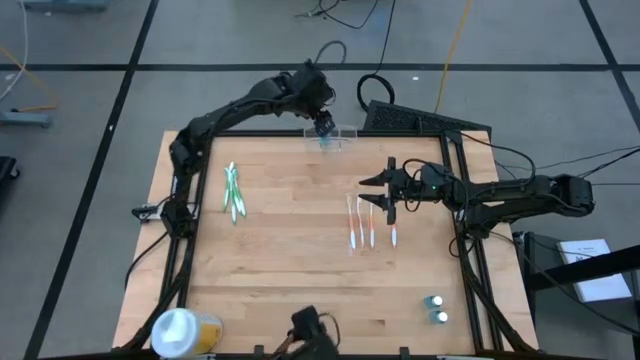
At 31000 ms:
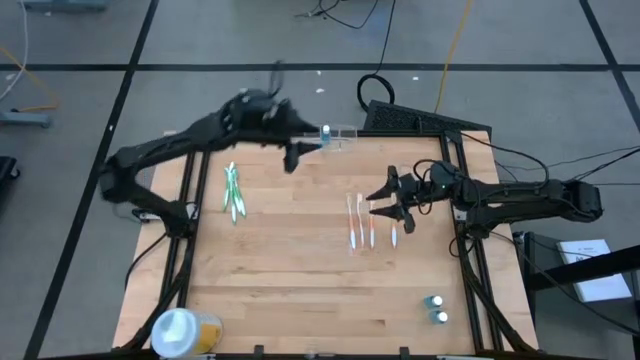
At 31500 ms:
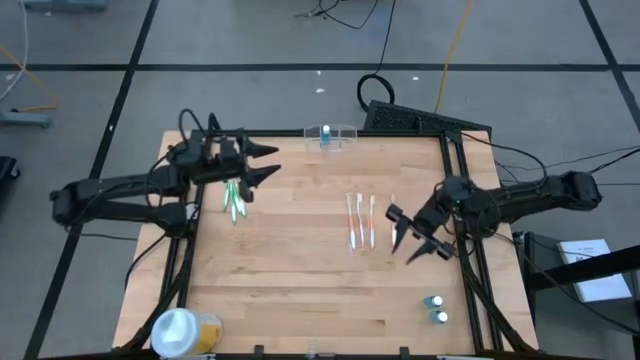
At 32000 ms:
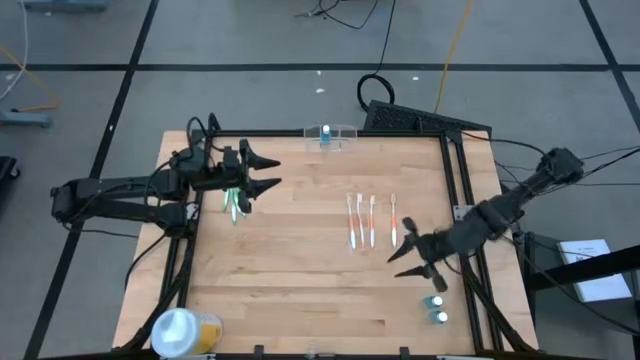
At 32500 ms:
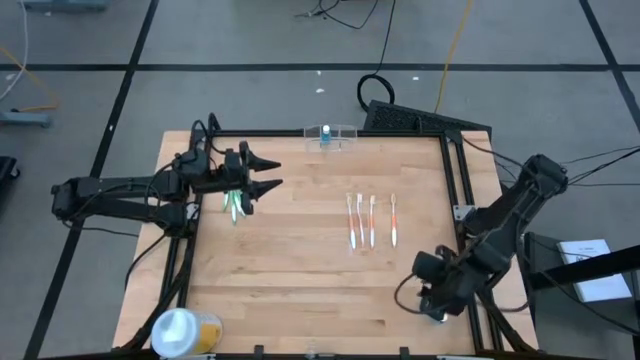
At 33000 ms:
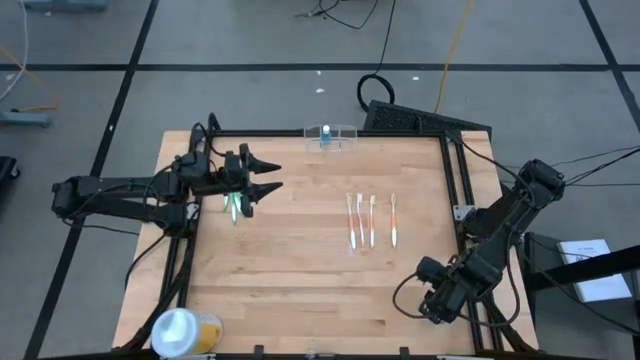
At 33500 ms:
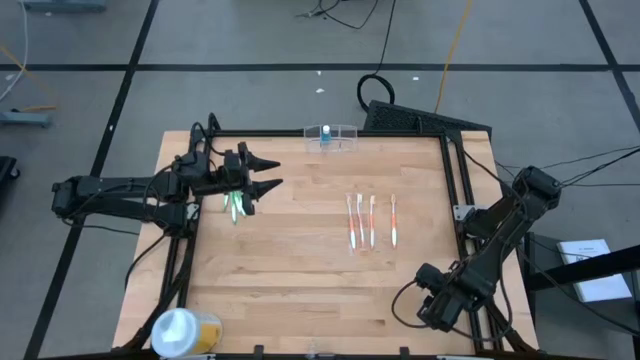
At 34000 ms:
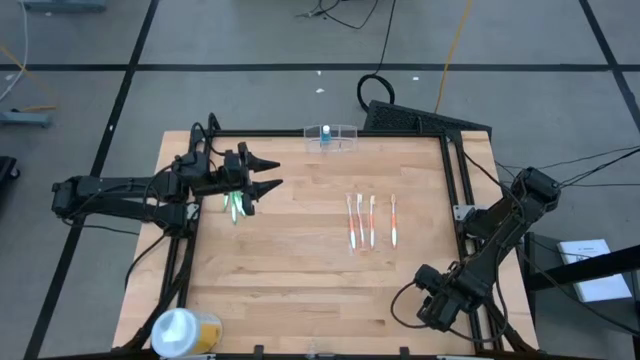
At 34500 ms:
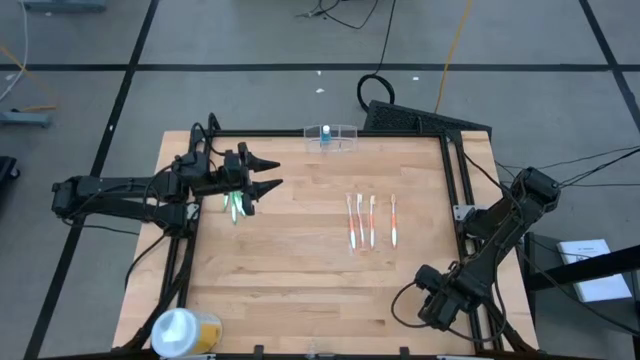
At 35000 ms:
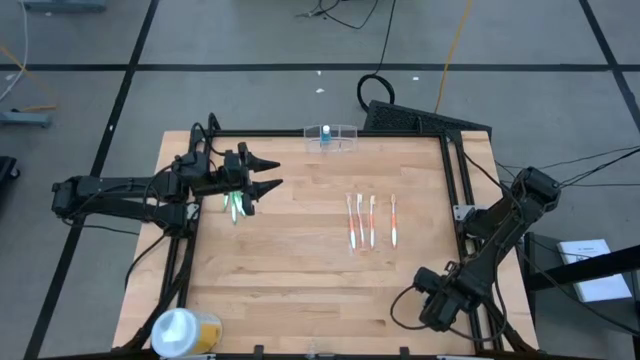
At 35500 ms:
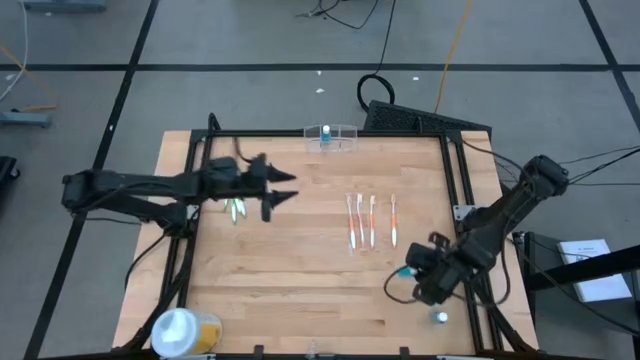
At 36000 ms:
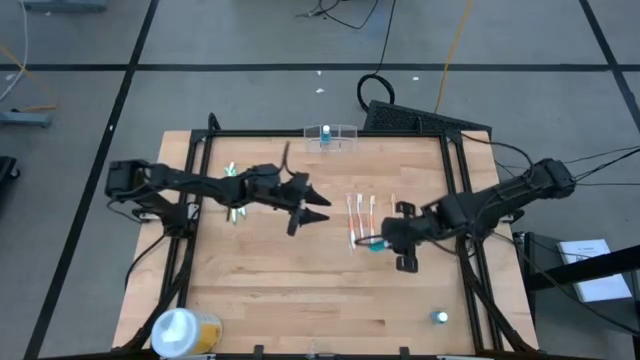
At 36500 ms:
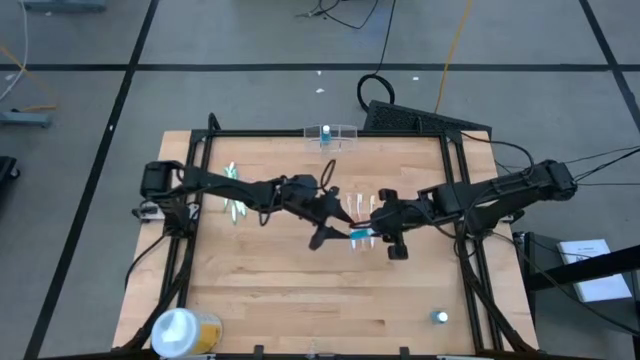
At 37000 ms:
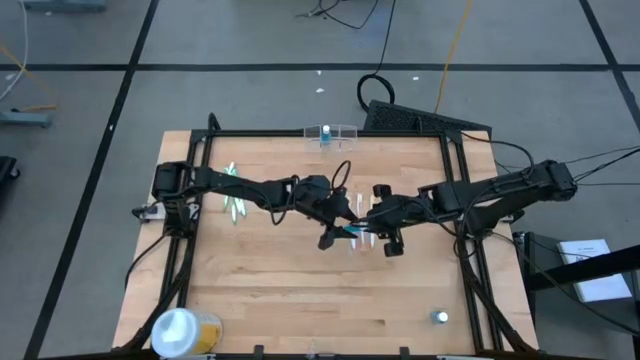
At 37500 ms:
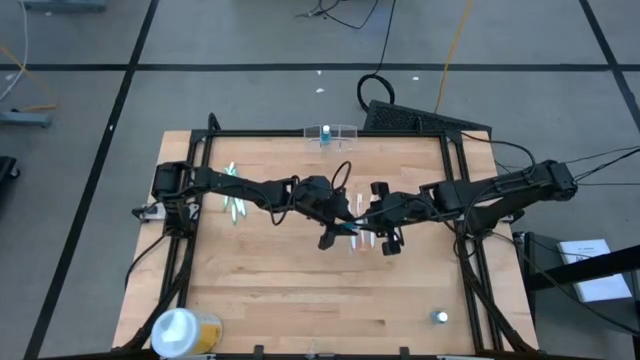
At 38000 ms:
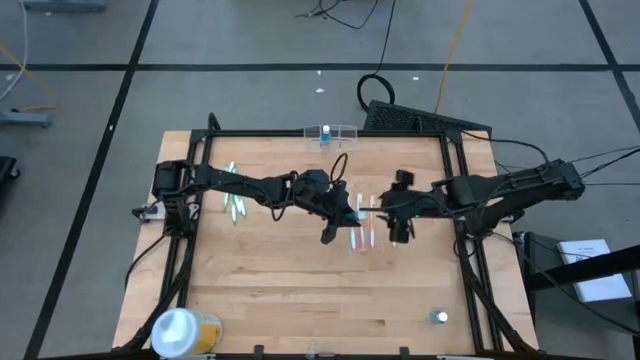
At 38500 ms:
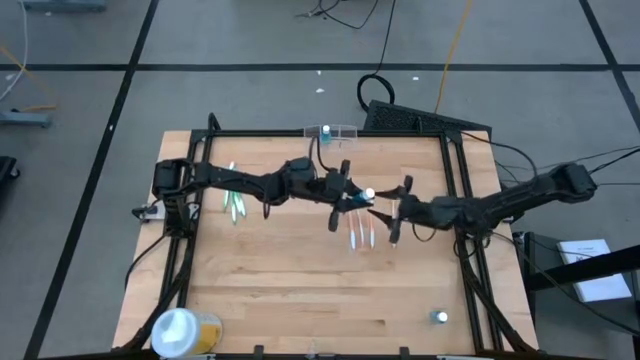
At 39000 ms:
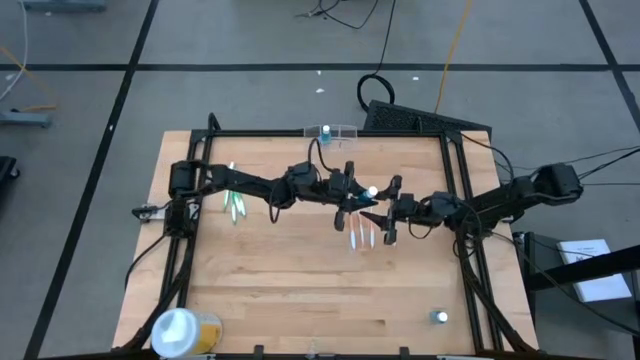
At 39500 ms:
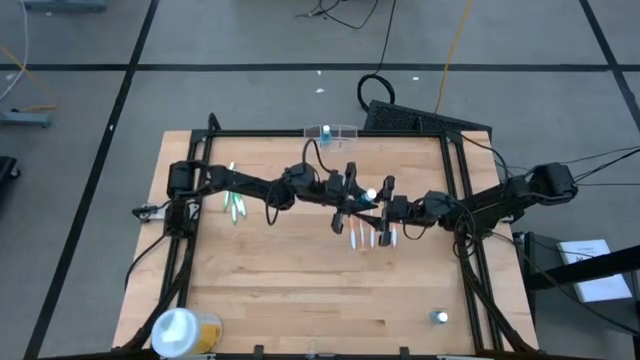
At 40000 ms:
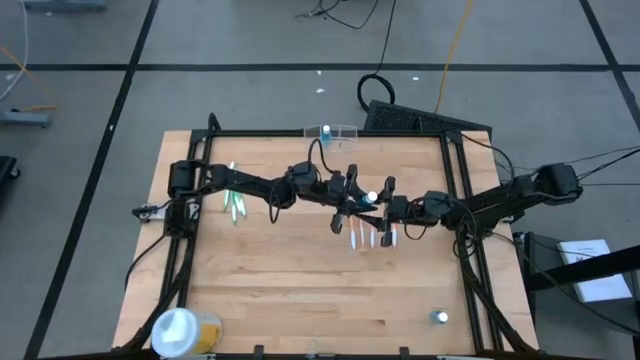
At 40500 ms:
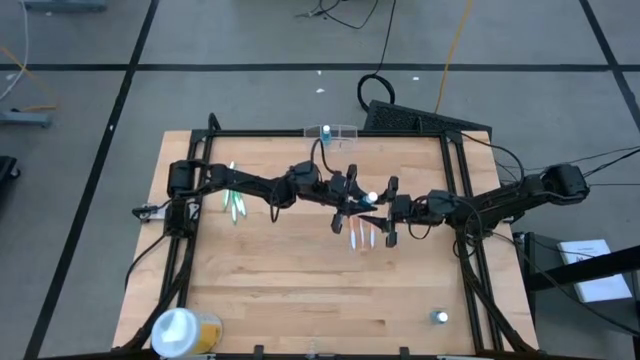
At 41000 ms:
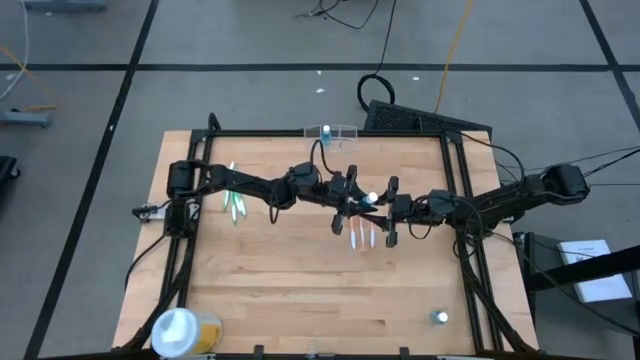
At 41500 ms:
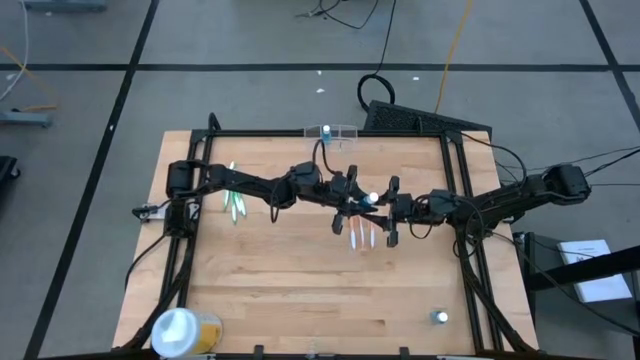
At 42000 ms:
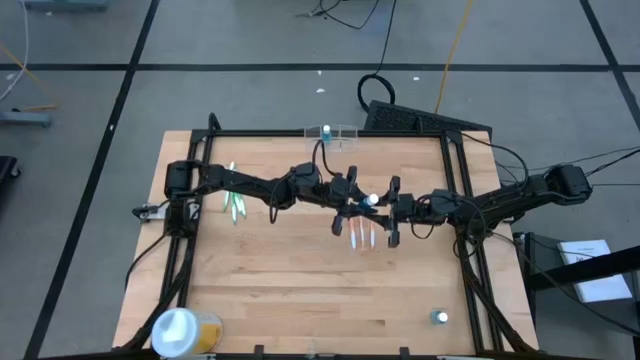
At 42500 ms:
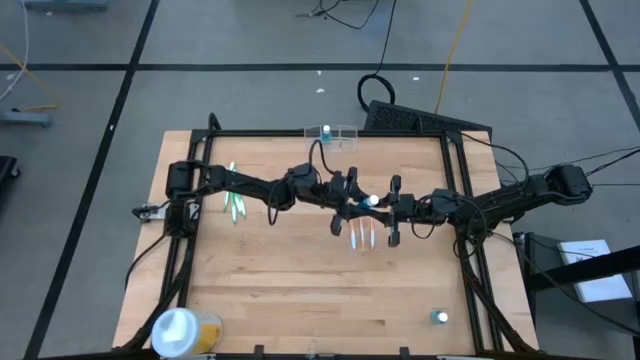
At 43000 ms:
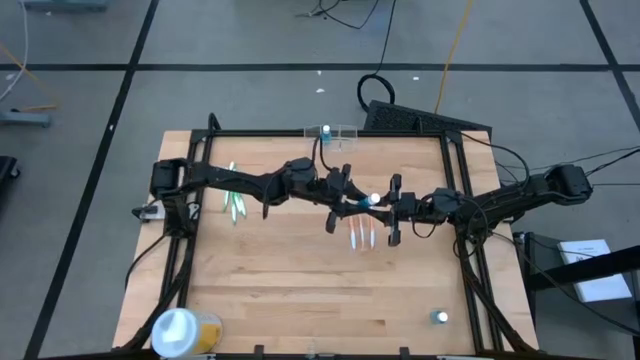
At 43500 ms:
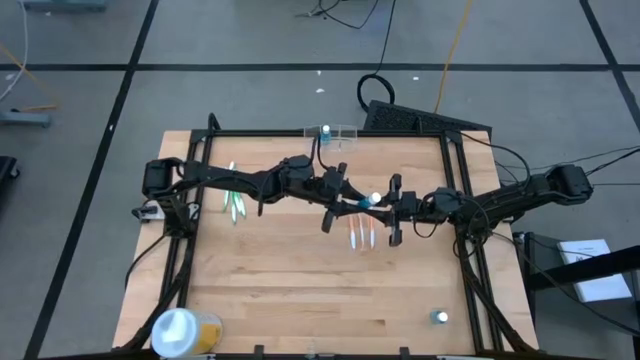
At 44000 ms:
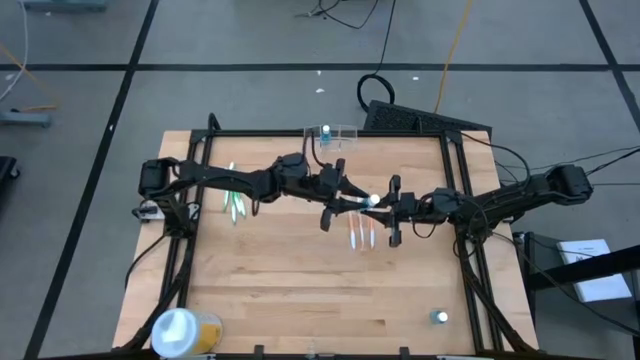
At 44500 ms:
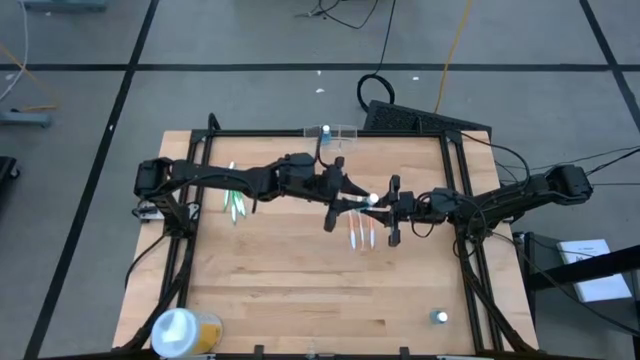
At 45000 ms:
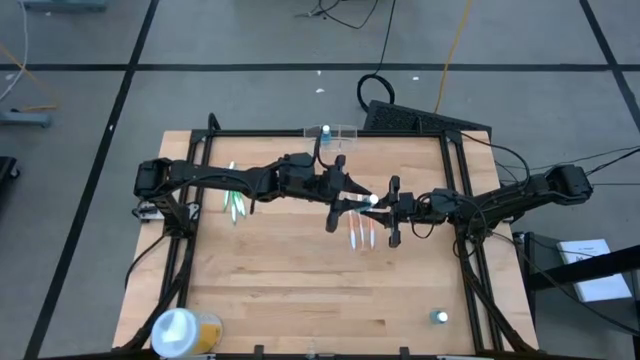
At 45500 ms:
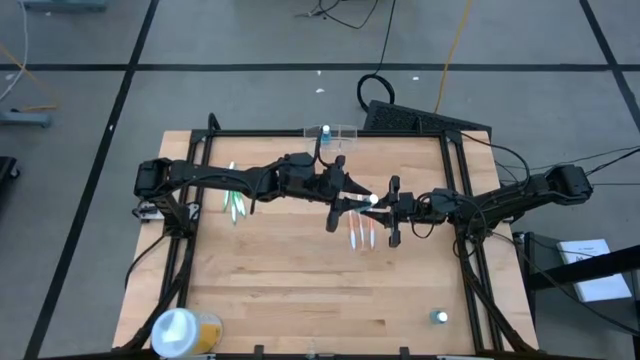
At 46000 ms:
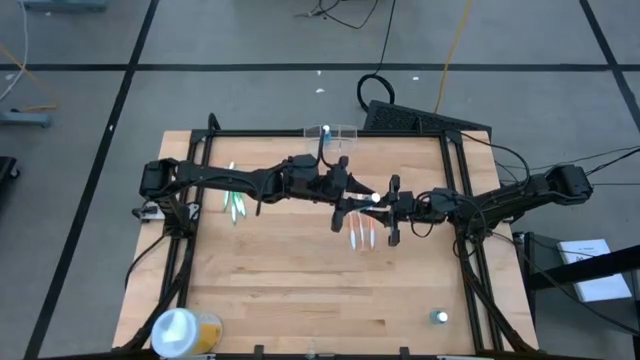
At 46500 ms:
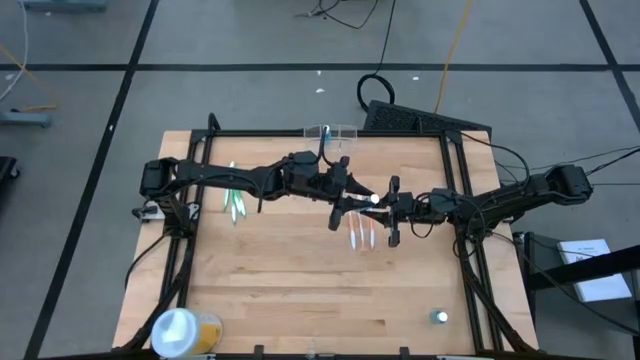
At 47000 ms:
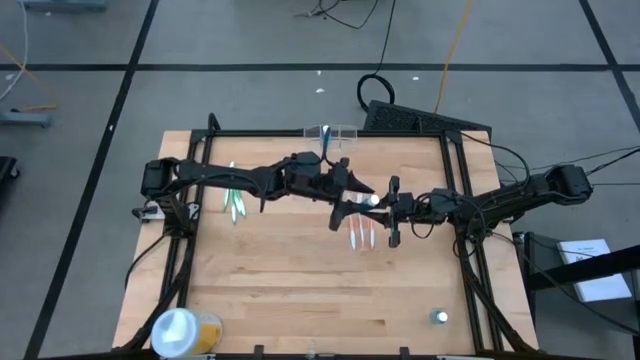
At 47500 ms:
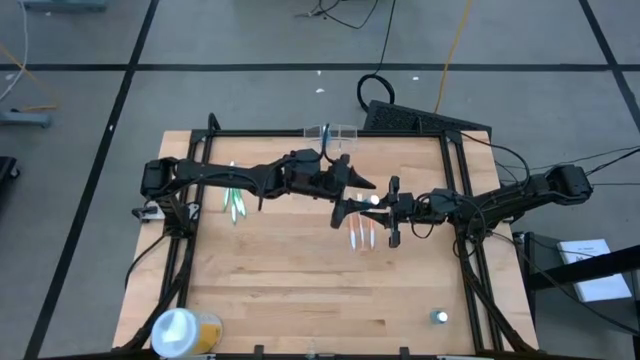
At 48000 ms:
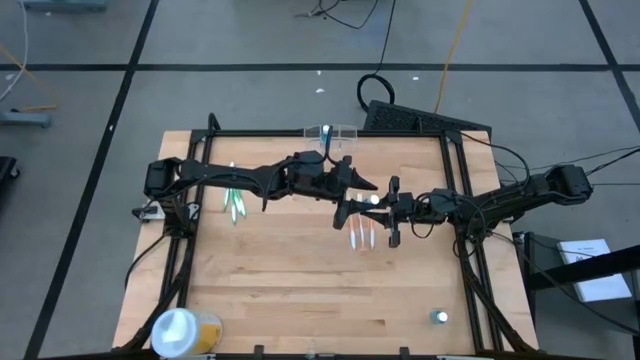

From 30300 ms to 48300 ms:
Task: Pick & Place toothbrushing station
Put the blue mouthwash into the transparent organizer

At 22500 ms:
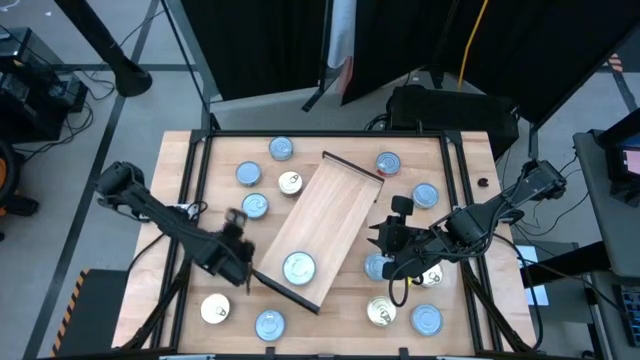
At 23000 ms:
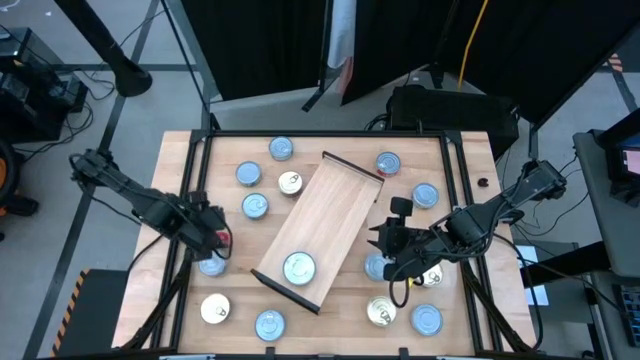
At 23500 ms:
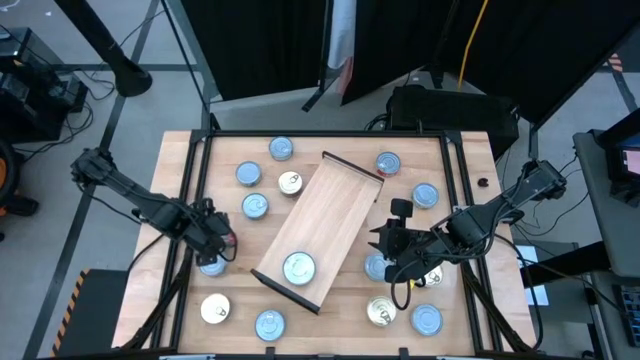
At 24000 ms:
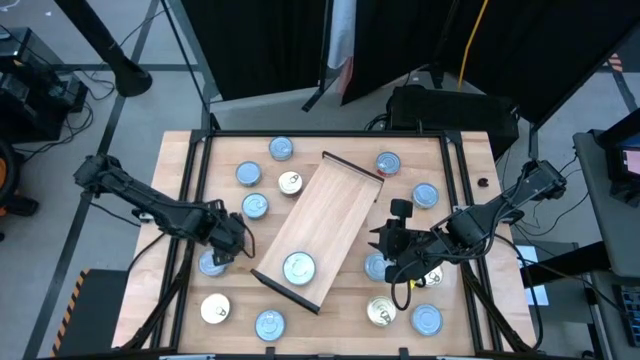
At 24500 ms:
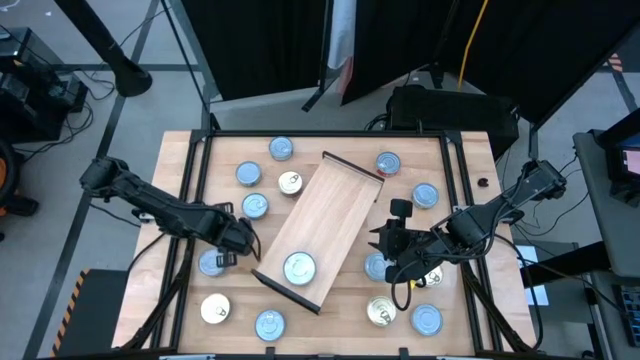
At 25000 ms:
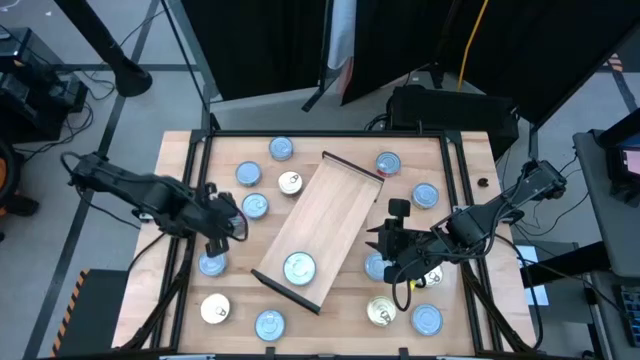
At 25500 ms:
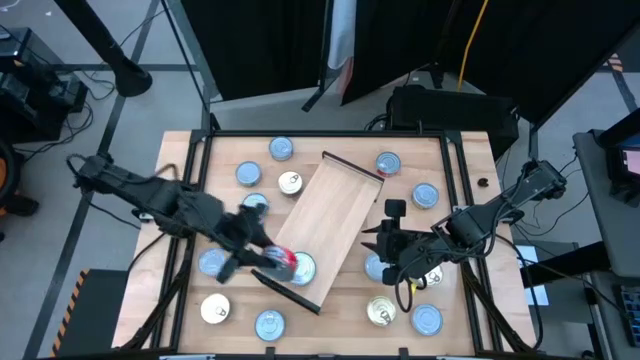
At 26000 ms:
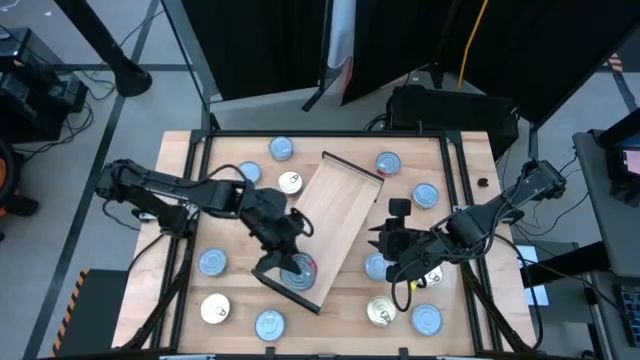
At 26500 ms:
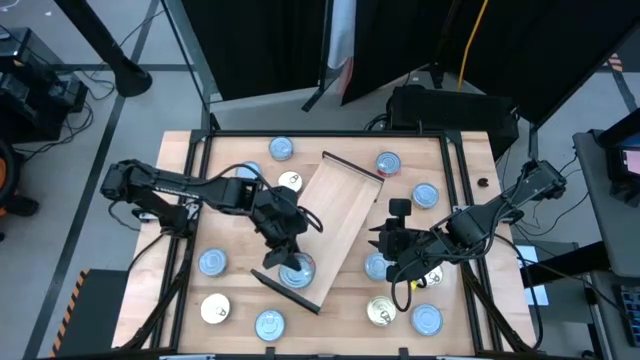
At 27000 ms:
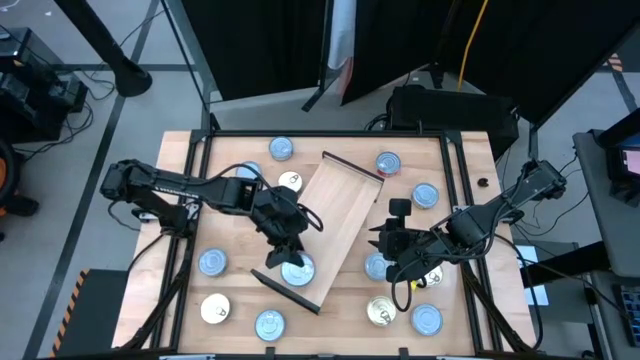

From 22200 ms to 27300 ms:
Task: Stack canned seafood by type on shelf
Stack the red tuna can on top of the other red tuna can on the shelf
